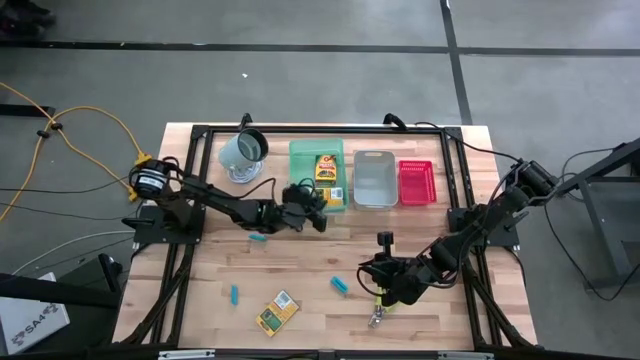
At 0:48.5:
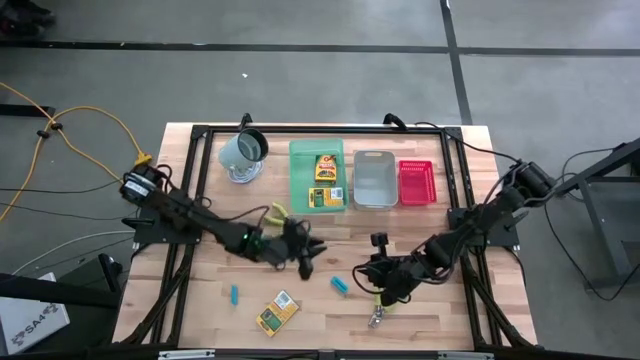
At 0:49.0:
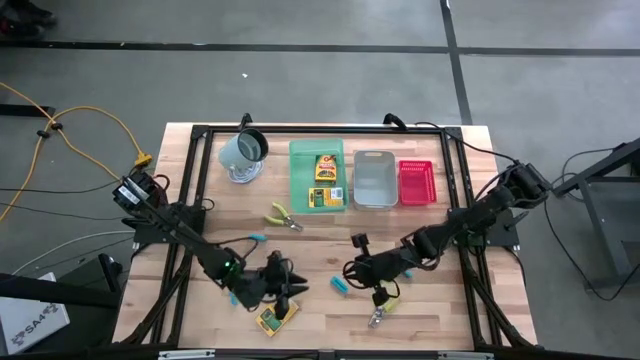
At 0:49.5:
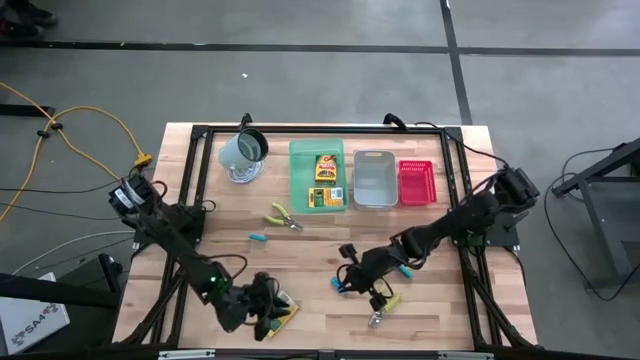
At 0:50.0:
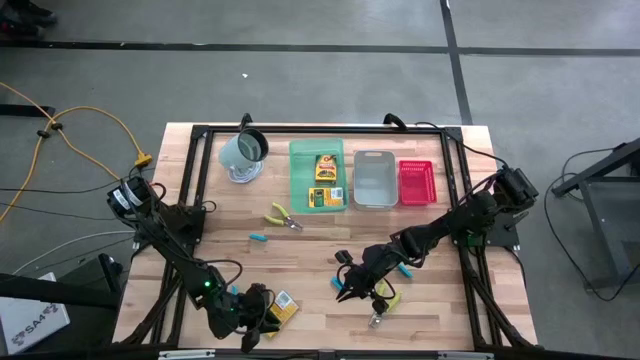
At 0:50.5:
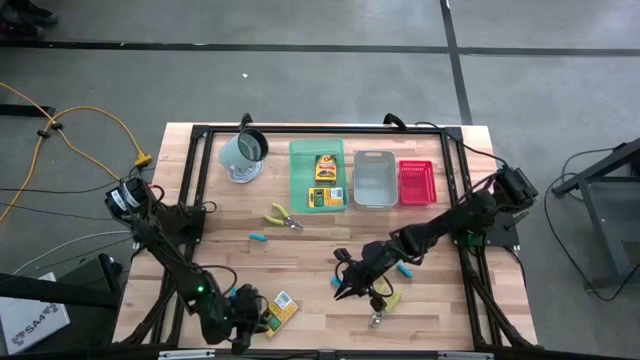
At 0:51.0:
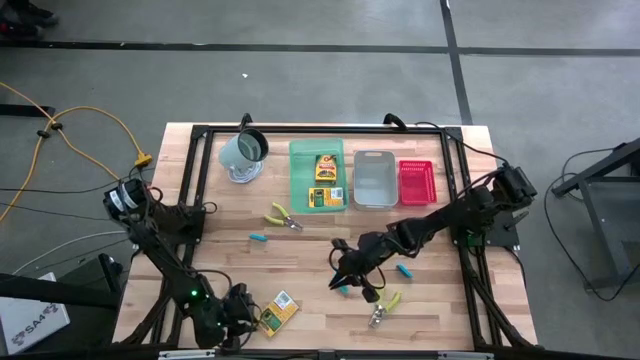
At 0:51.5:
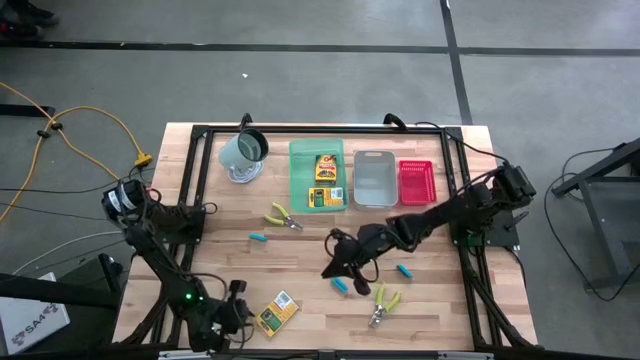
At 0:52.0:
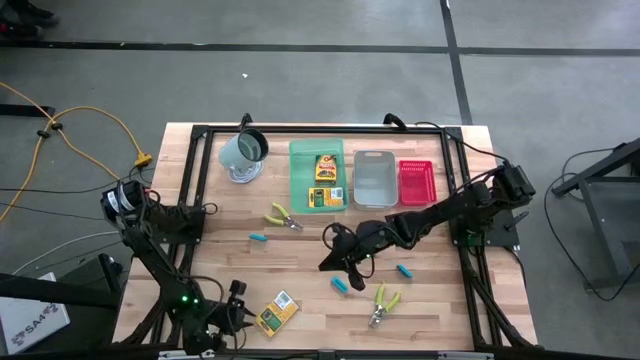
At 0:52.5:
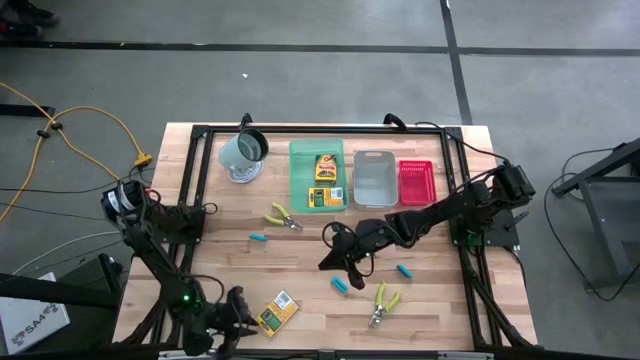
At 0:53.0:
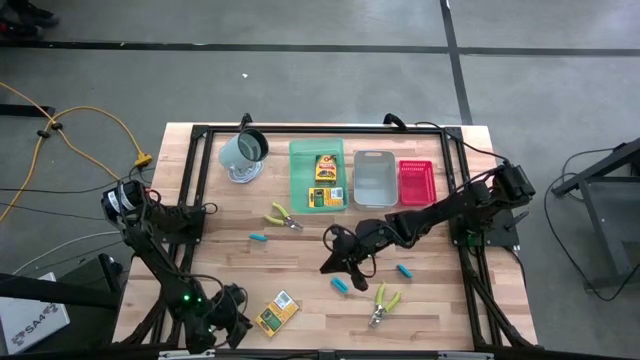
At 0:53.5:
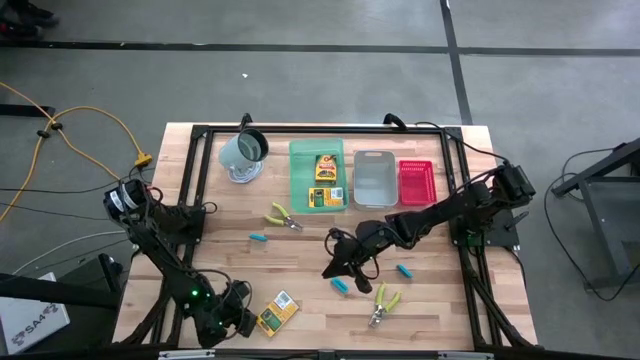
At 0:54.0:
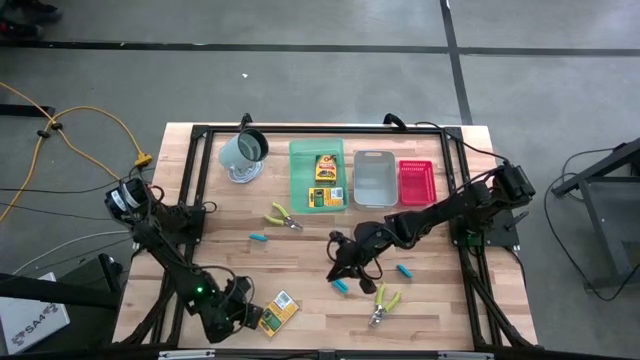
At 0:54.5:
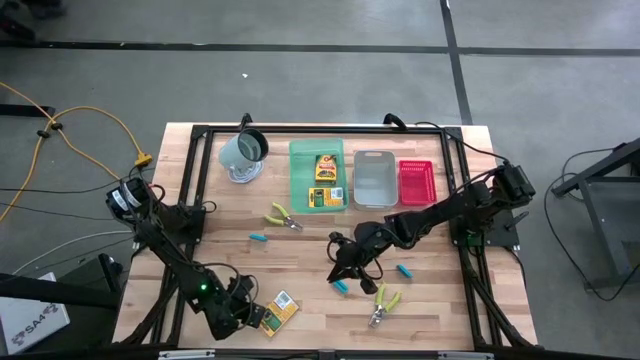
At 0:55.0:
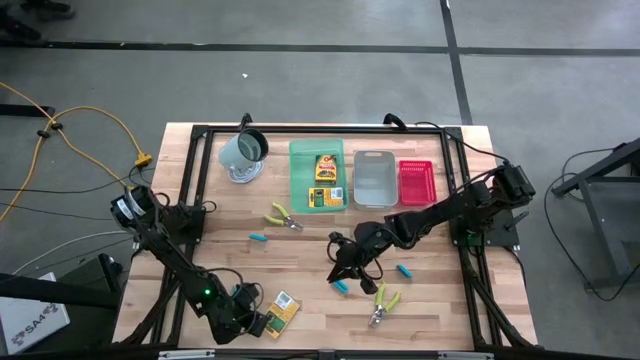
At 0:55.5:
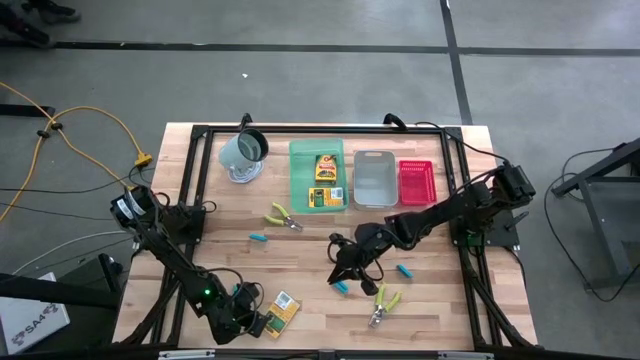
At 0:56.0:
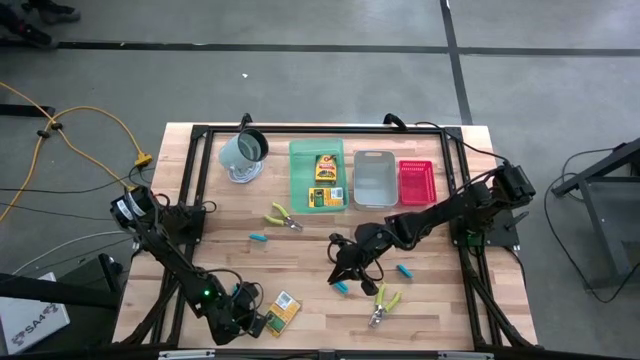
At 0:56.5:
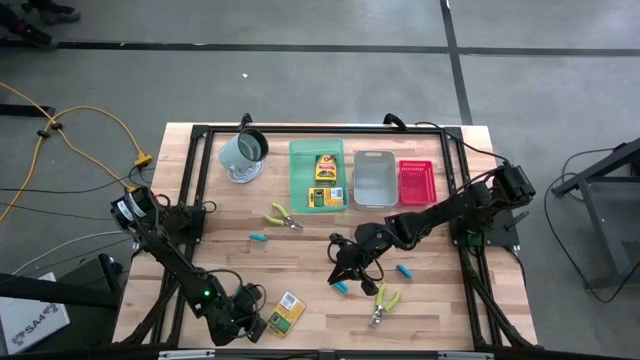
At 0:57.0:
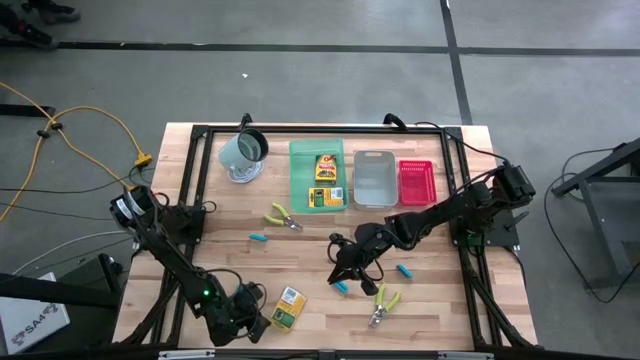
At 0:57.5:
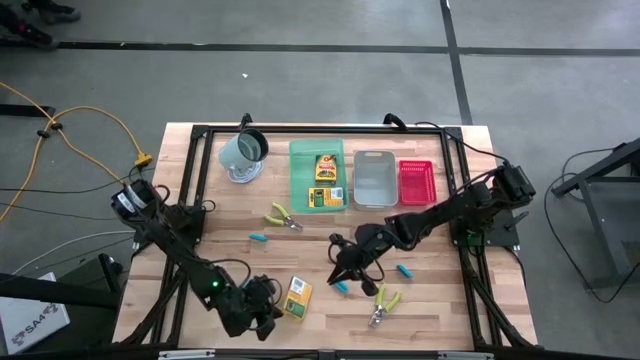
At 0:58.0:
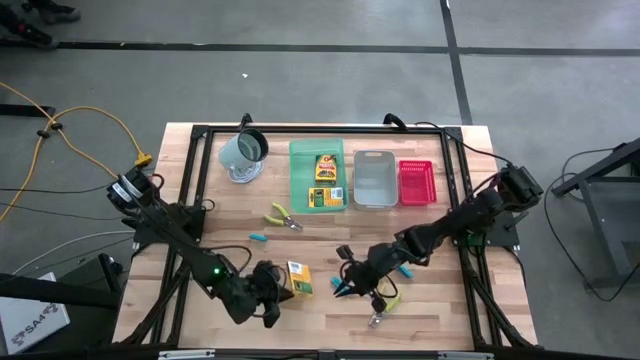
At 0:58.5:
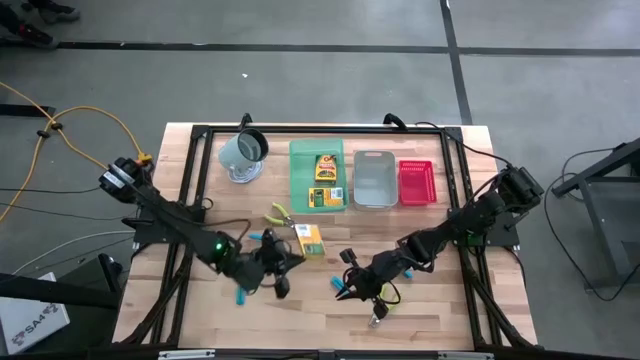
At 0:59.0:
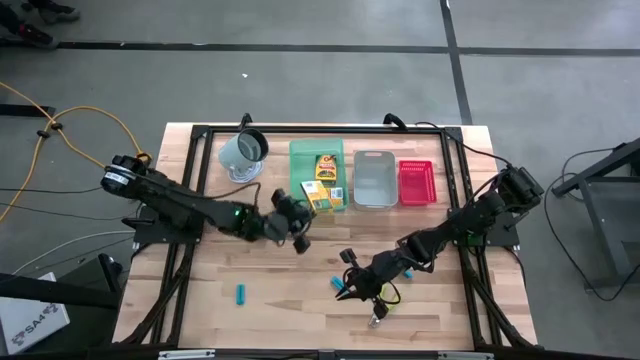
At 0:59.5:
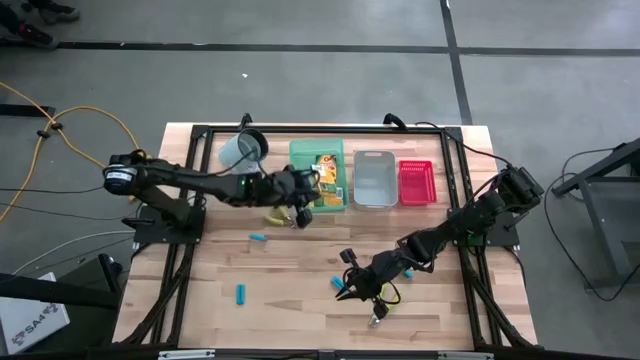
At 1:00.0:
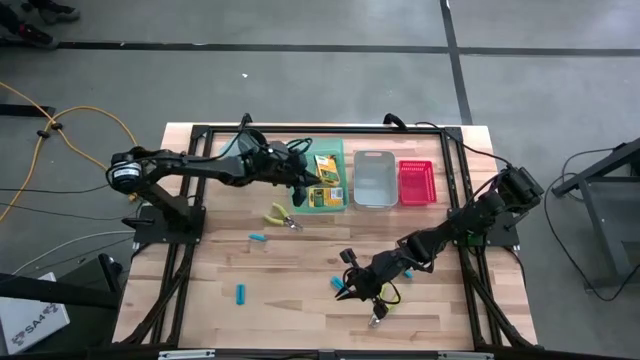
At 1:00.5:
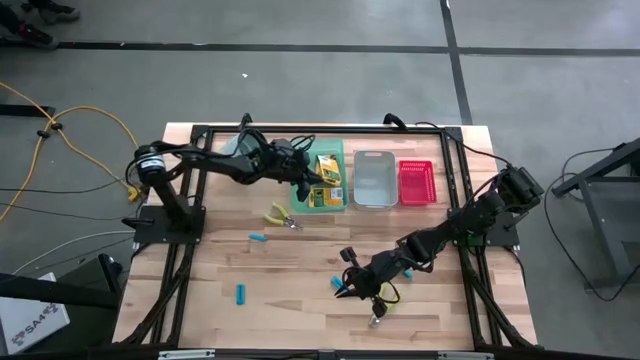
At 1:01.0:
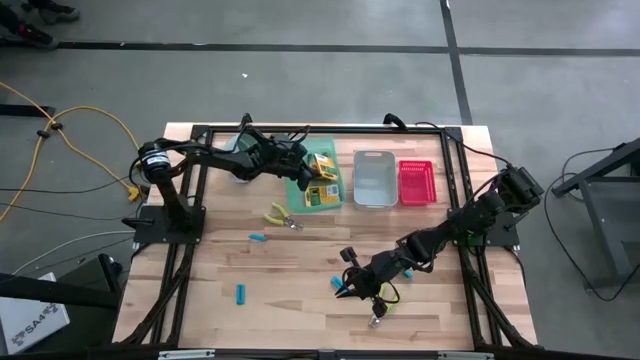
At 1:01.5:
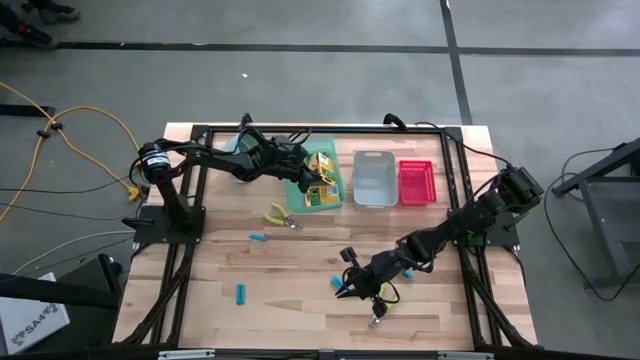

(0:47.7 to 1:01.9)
Task: Pick & Place School Supplies
Put the yellow crayon box into the green bin

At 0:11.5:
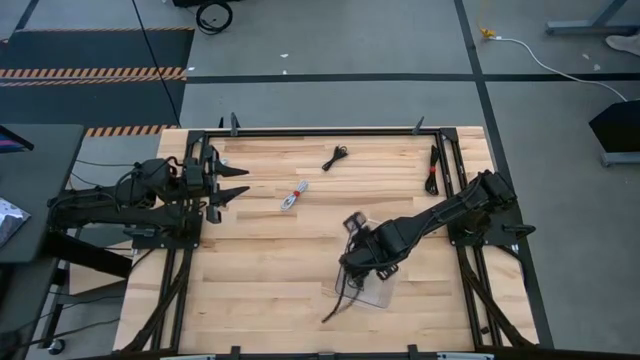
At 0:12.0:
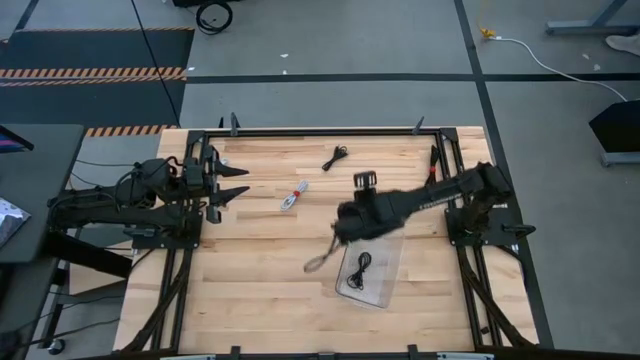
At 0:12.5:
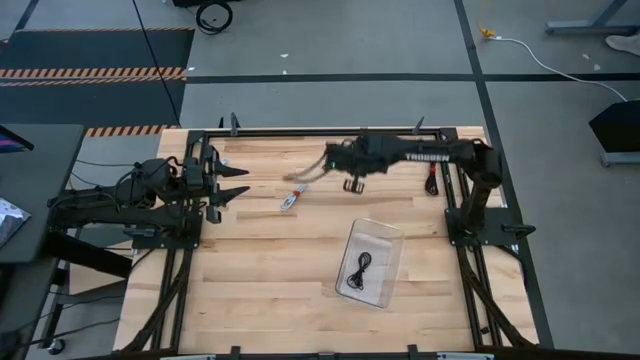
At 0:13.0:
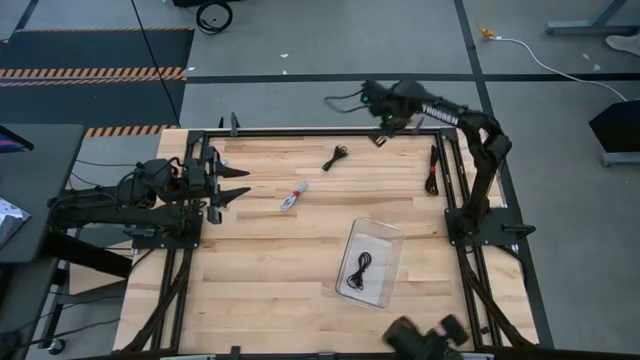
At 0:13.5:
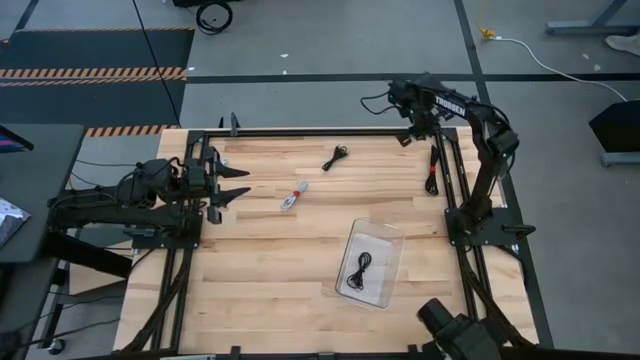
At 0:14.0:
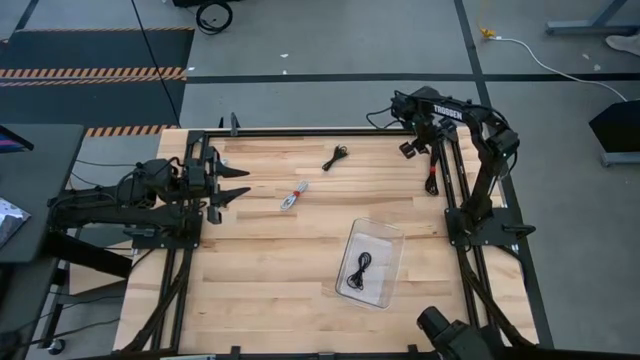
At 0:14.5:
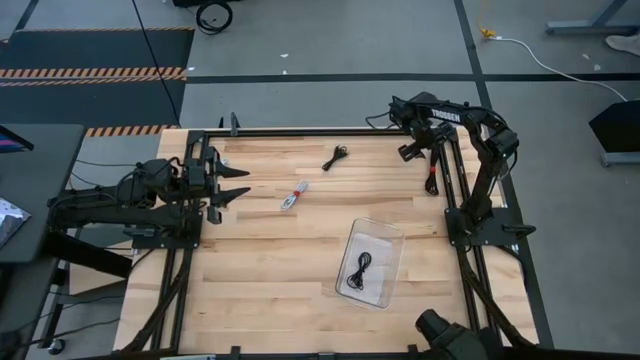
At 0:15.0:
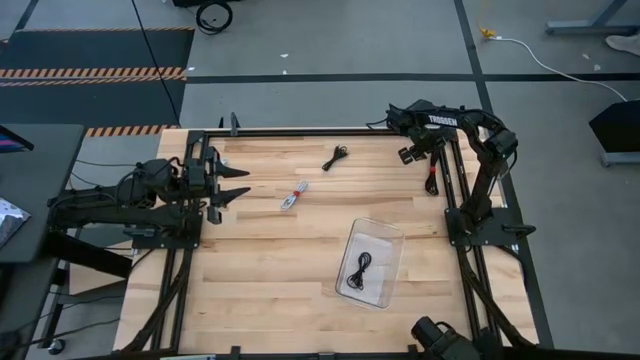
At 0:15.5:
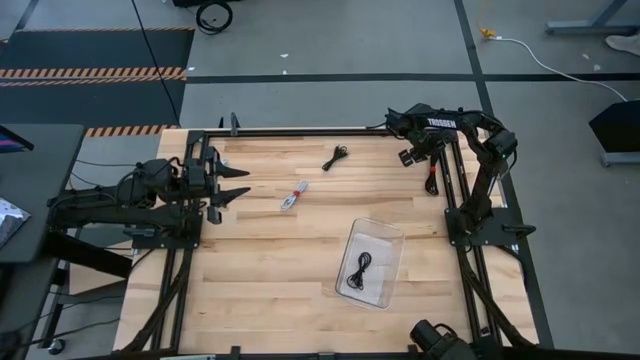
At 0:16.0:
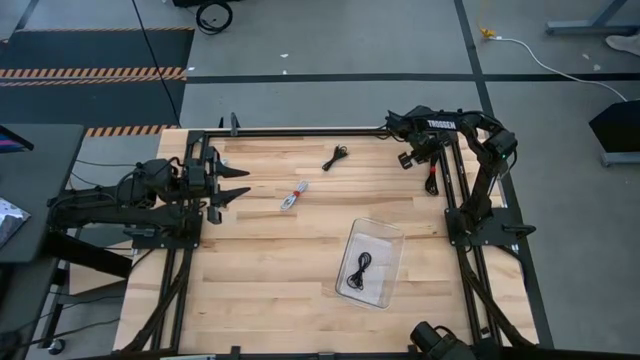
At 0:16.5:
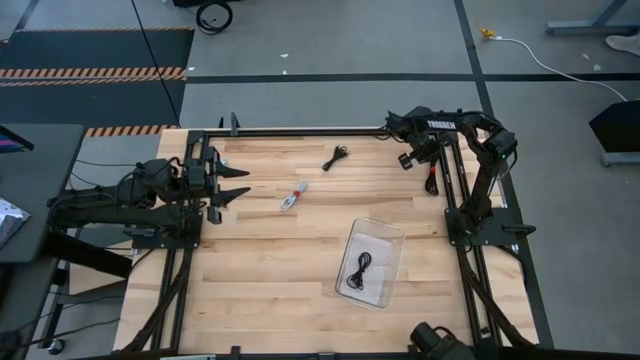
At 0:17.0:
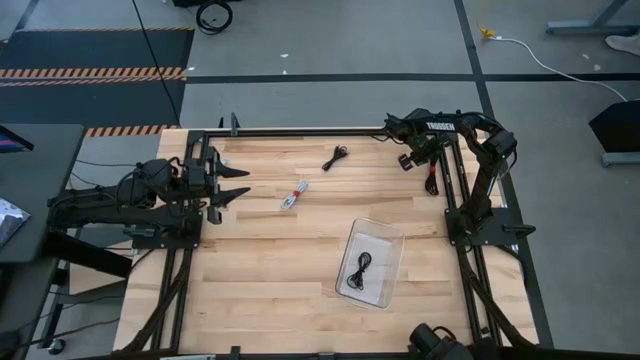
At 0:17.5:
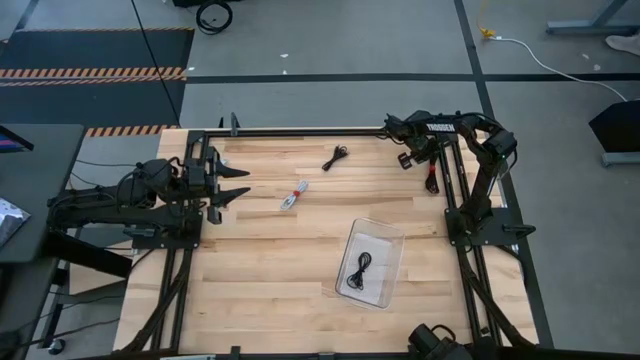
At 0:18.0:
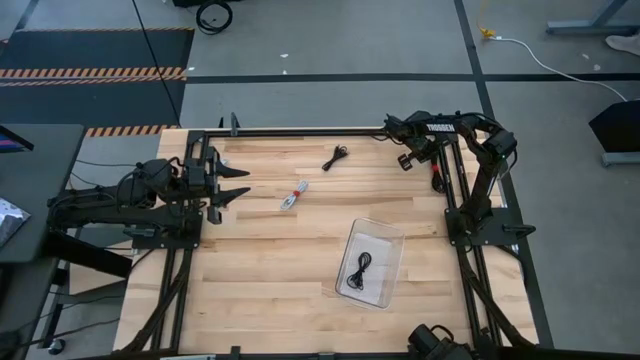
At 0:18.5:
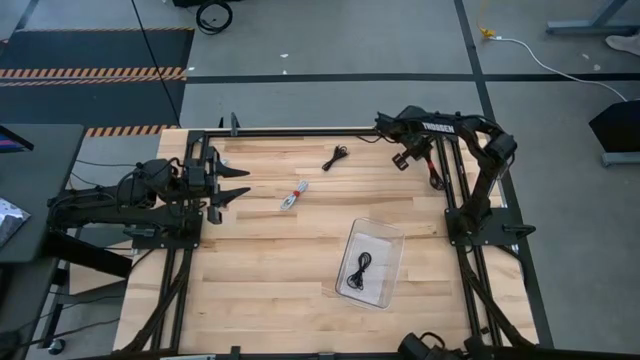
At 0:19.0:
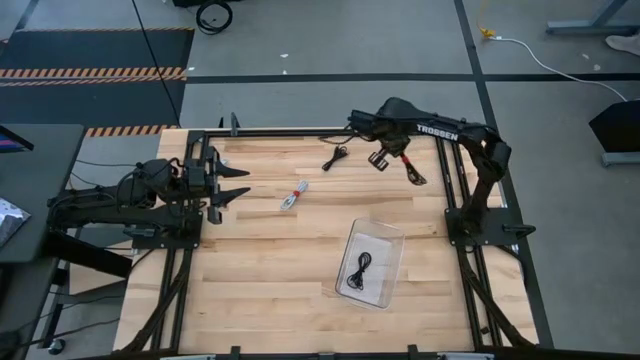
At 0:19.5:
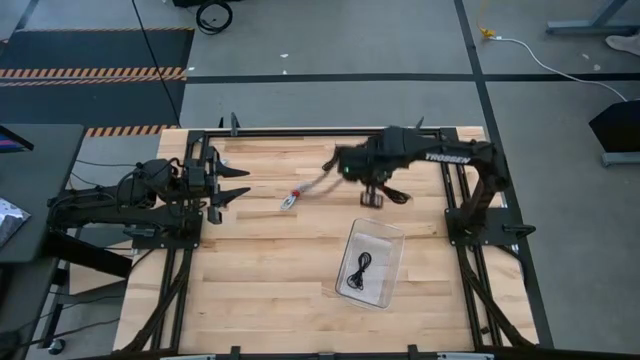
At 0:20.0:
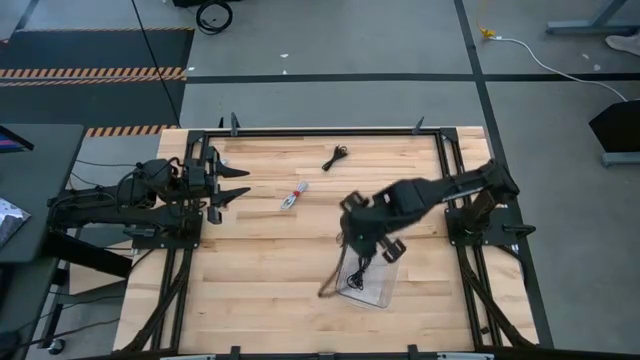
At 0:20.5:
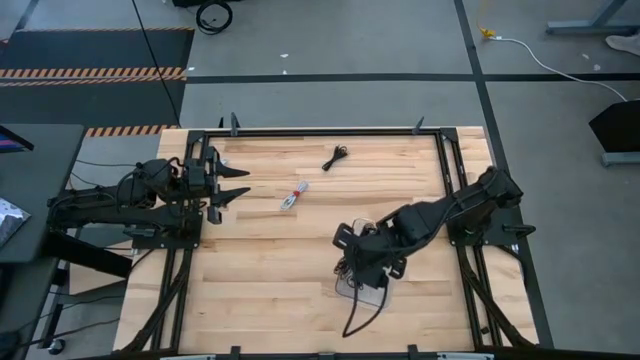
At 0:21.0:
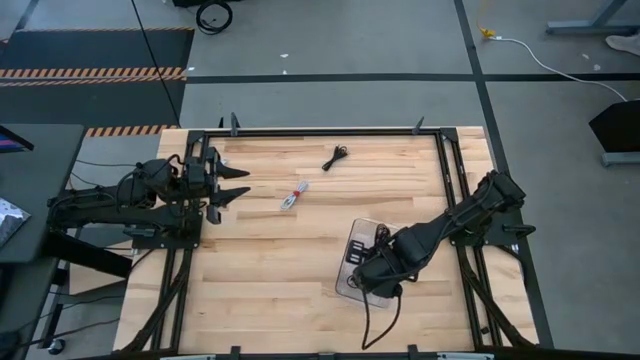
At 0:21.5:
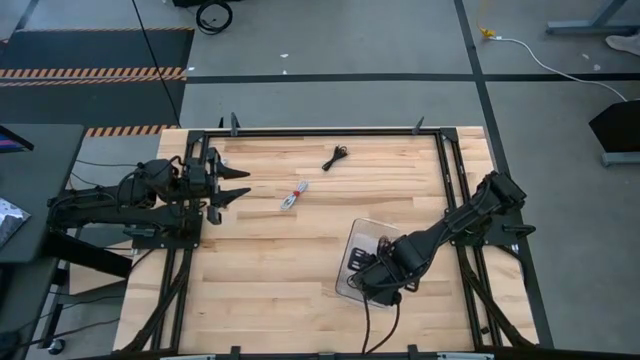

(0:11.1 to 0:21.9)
Task: Pick and place USB-C Cables
Put the right black USB charger cable into the transparent bin
